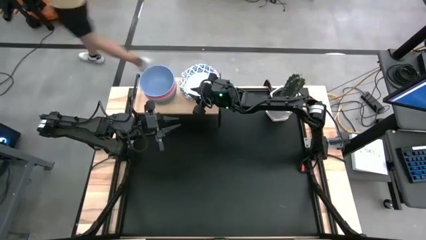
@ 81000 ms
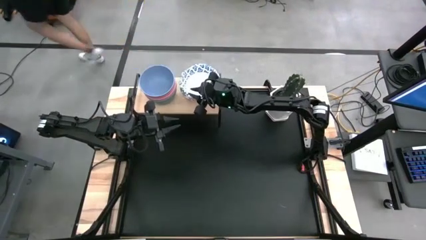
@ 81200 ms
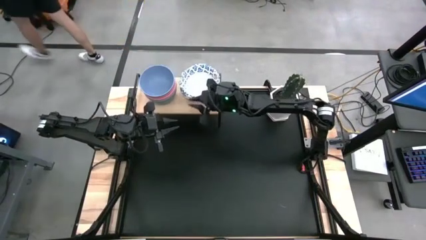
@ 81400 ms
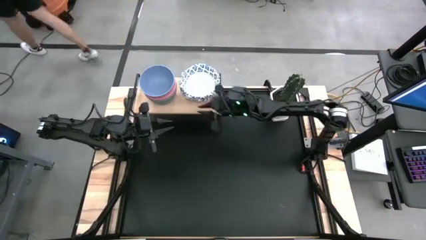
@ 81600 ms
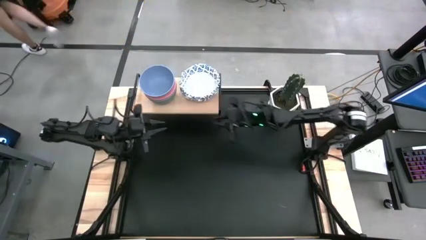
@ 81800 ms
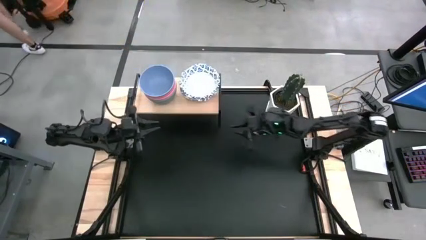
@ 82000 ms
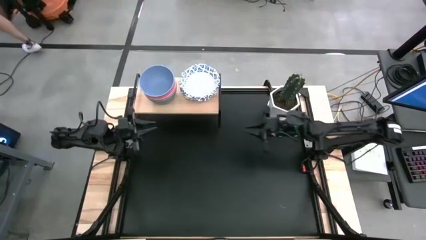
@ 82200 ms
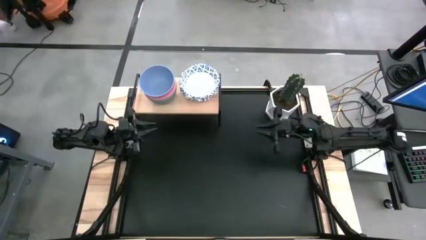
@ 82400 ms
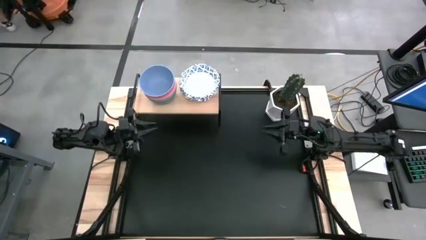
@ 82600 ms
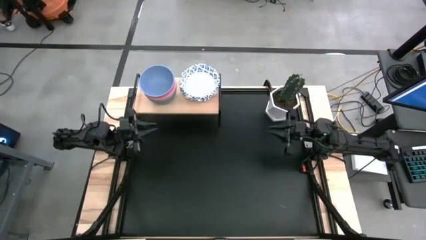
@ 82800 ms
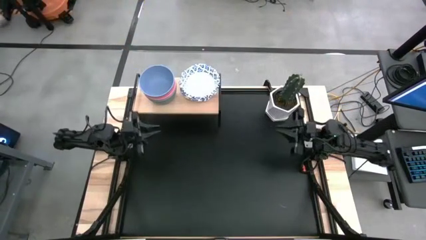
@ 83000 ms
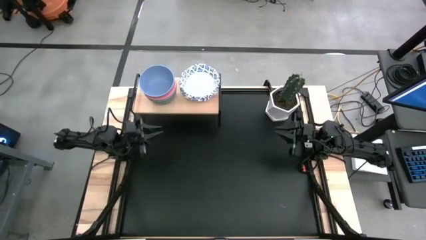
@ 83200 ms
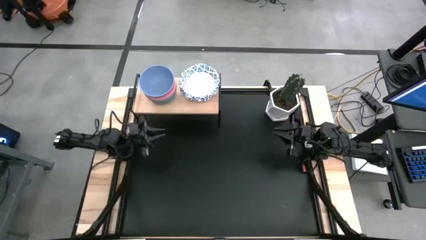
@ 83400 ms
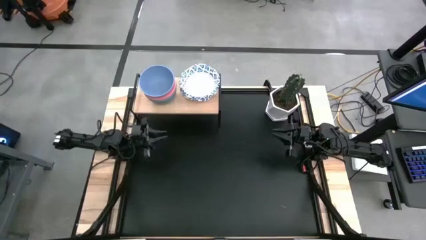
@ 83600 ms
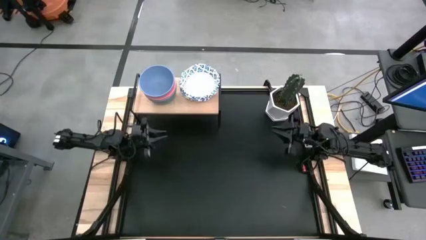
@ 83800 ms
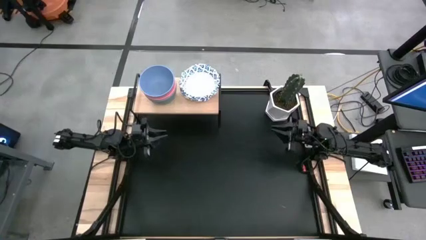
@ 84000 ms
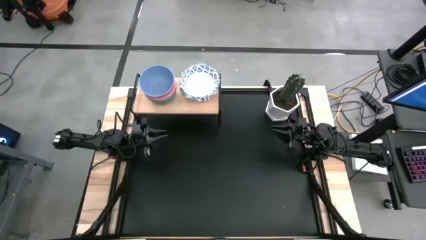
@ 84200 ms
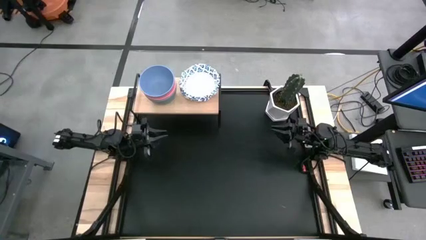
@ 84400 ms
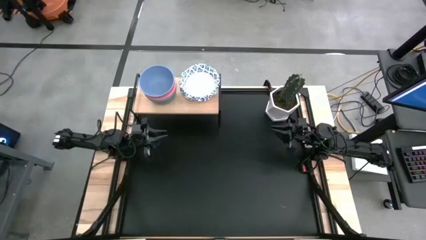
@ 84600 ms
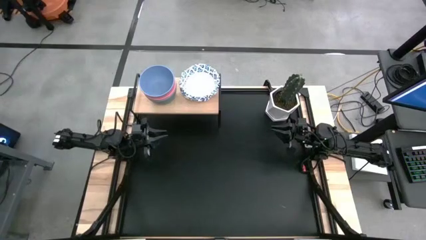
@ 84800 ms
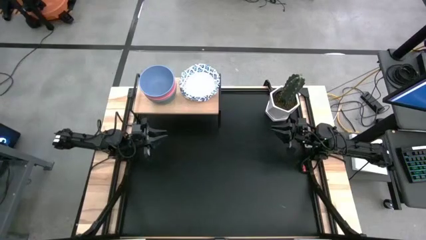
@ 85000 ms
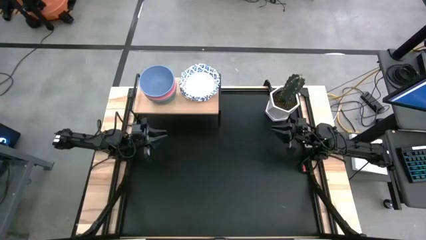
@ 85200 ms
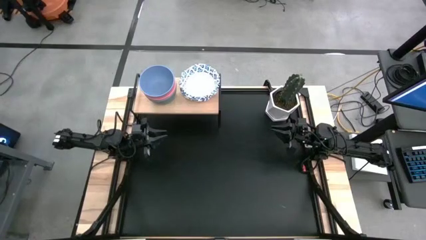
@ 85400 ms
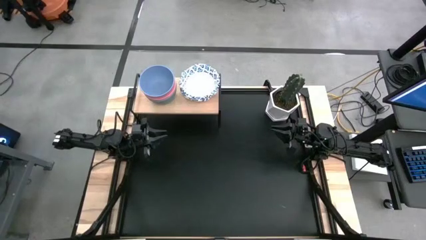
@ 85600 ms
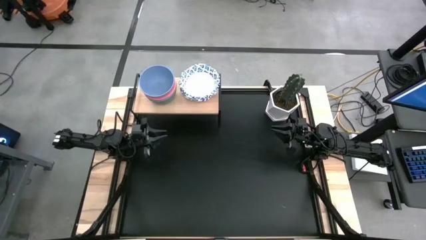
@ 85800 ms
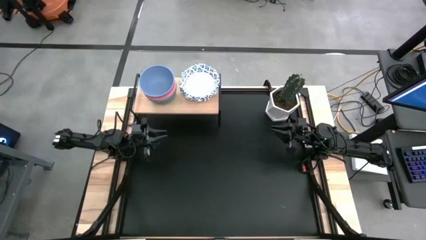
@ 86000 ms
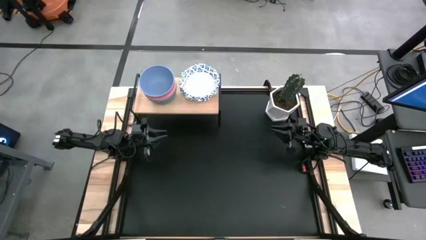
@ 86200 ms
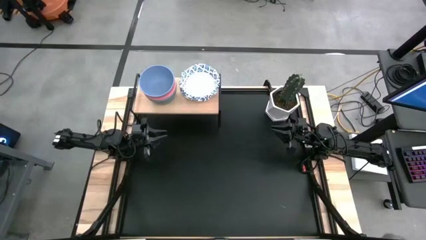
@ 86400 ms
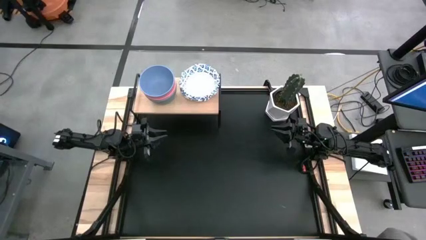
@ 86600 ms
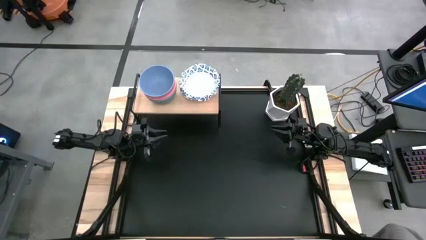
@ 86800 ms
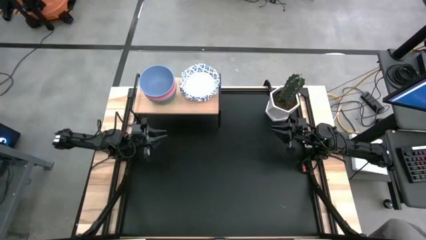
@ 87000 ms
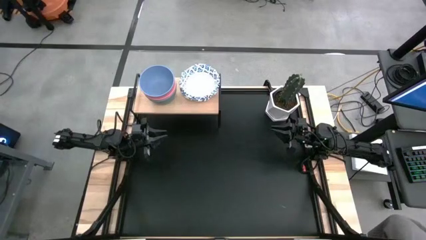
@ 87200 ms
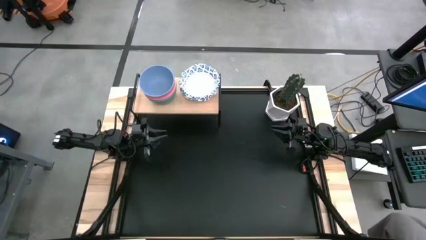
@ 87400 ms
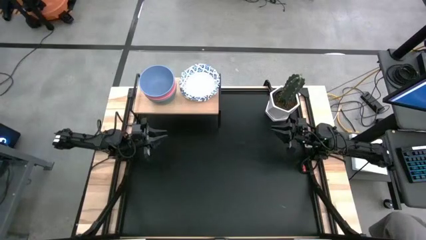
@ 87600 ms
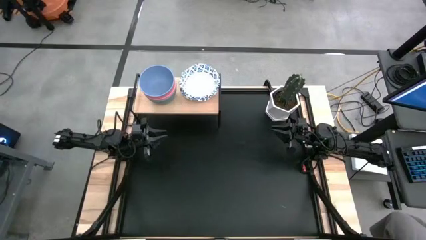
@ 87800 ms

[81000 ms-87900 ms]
Task: Place and stack bowls onto a shelf
Return to Home Position

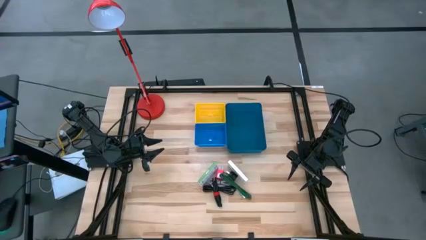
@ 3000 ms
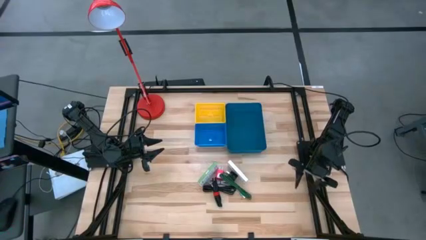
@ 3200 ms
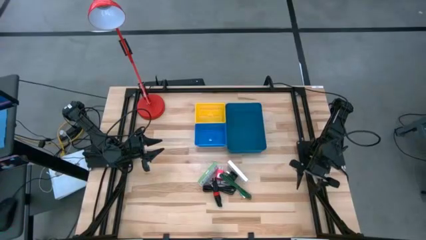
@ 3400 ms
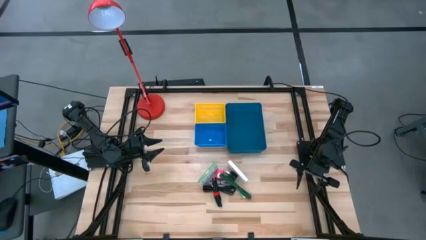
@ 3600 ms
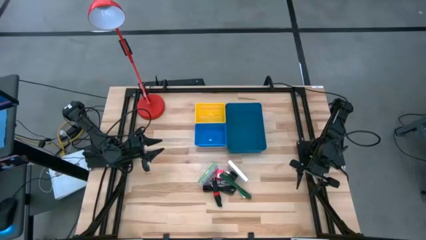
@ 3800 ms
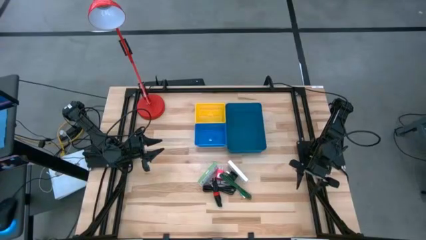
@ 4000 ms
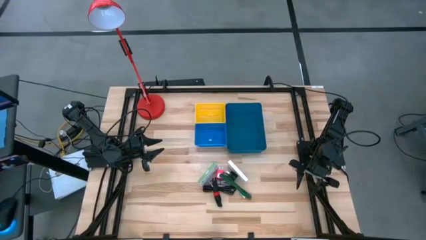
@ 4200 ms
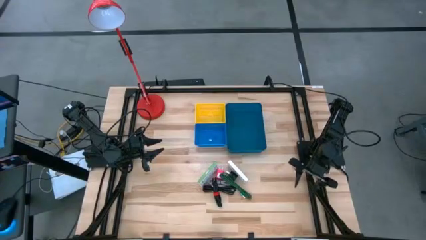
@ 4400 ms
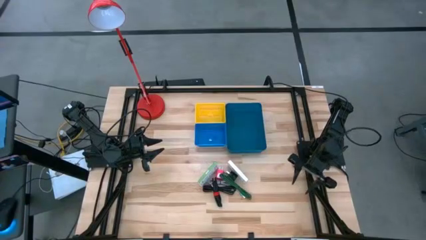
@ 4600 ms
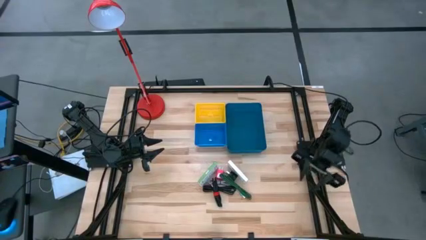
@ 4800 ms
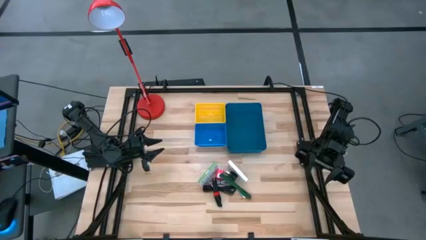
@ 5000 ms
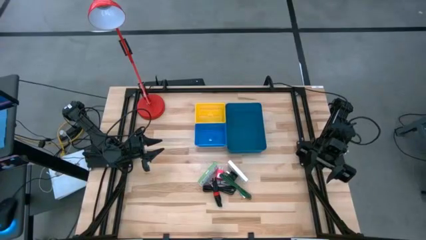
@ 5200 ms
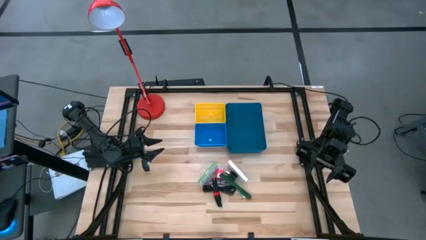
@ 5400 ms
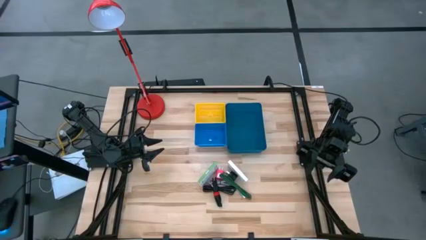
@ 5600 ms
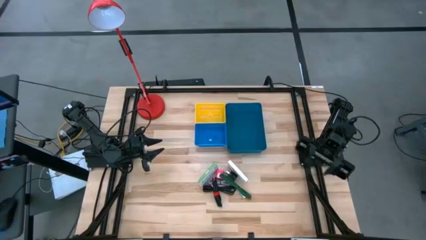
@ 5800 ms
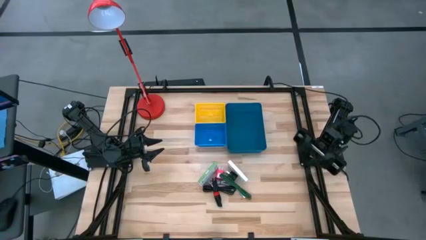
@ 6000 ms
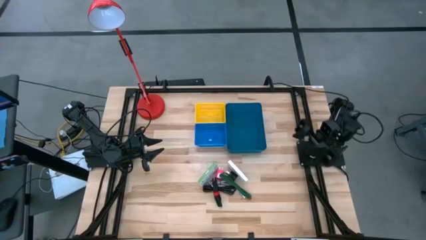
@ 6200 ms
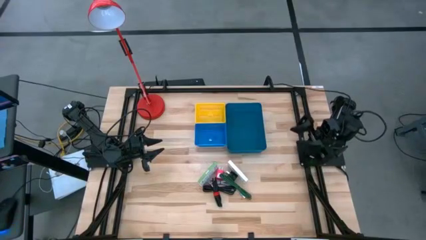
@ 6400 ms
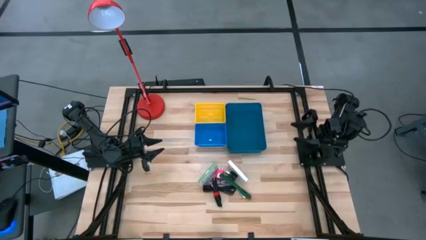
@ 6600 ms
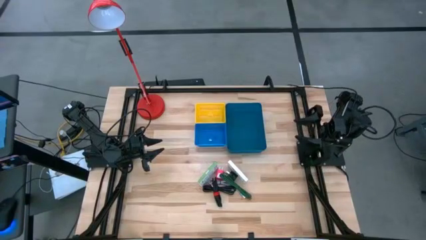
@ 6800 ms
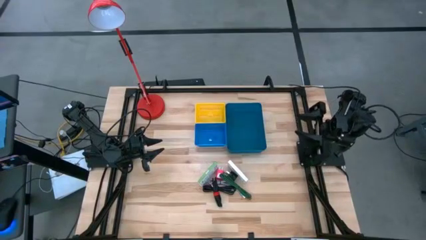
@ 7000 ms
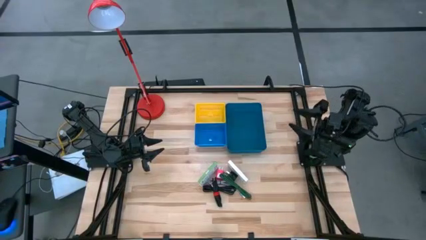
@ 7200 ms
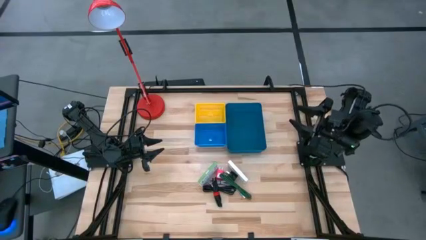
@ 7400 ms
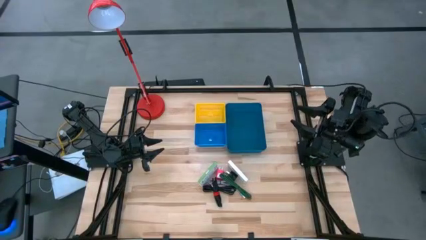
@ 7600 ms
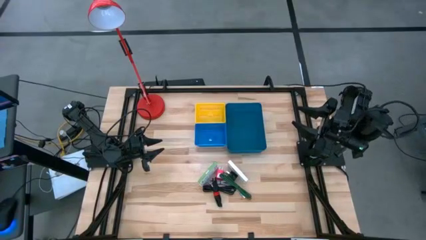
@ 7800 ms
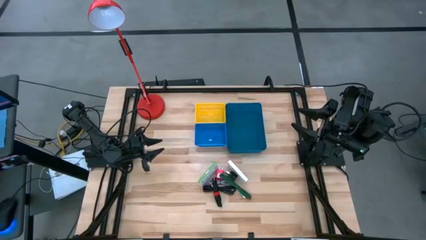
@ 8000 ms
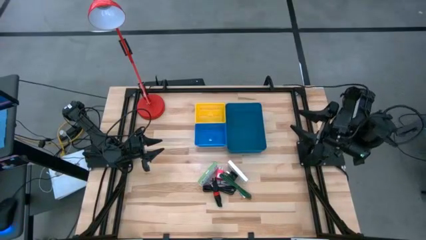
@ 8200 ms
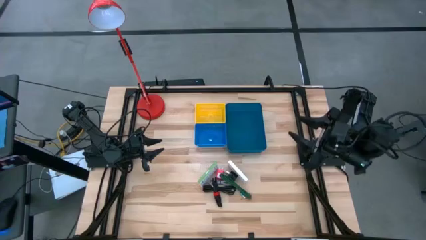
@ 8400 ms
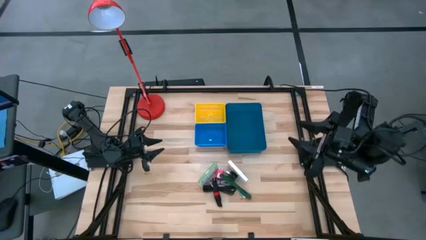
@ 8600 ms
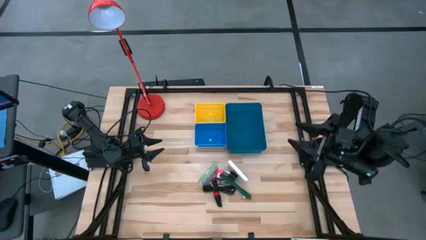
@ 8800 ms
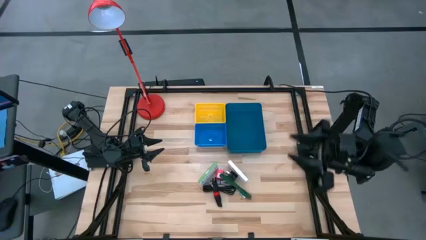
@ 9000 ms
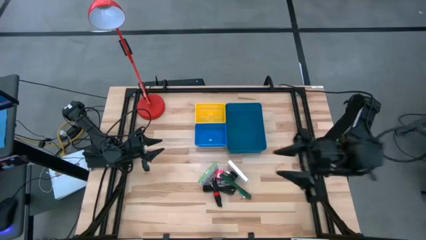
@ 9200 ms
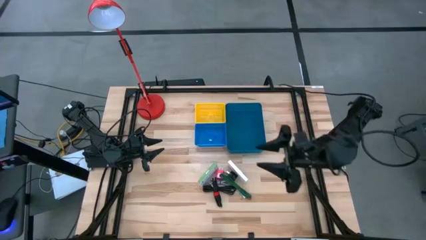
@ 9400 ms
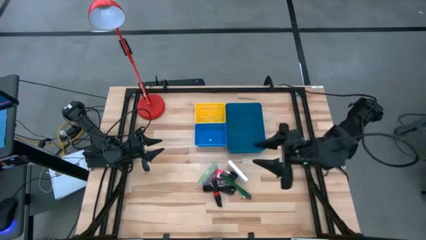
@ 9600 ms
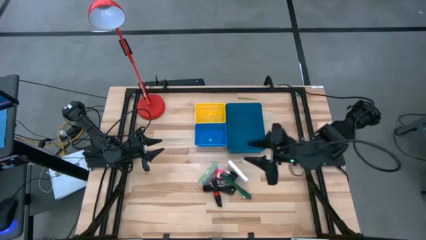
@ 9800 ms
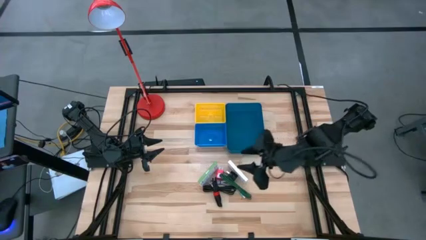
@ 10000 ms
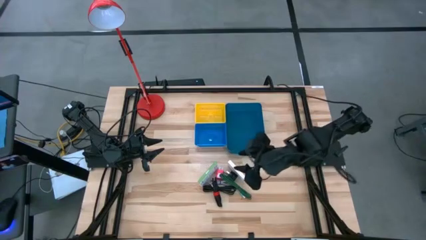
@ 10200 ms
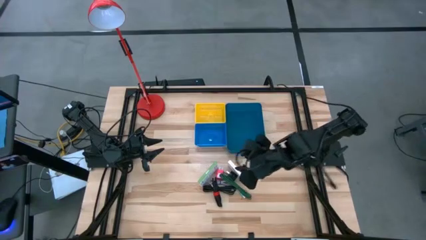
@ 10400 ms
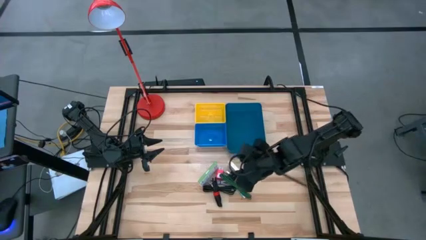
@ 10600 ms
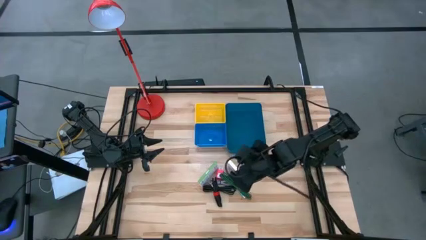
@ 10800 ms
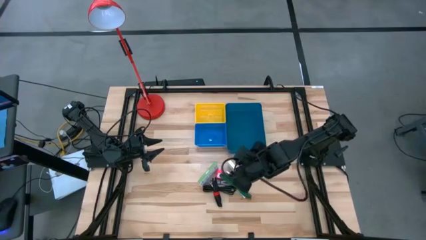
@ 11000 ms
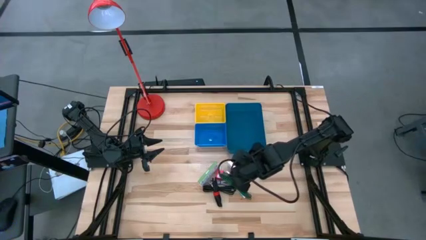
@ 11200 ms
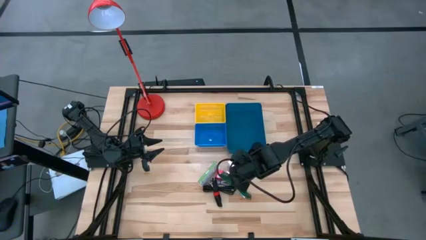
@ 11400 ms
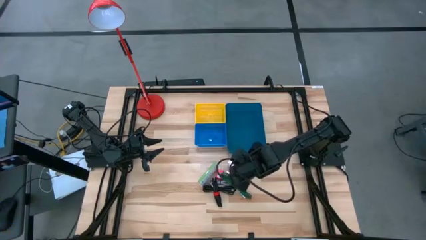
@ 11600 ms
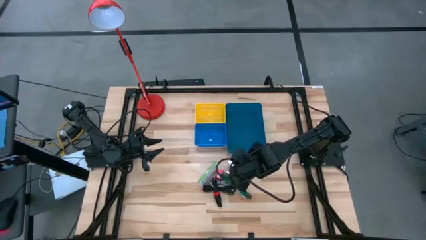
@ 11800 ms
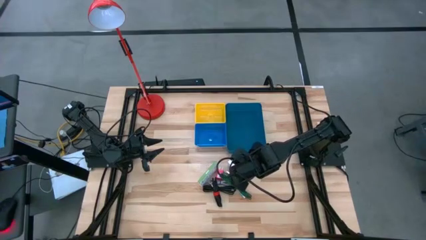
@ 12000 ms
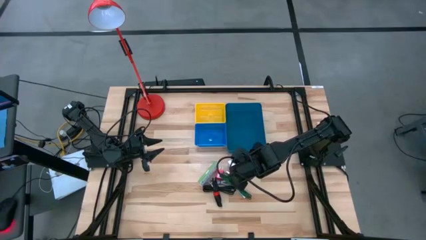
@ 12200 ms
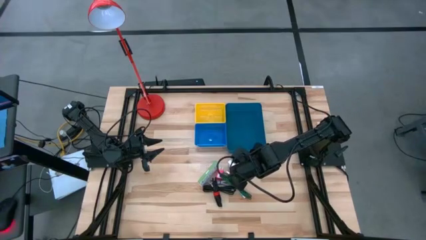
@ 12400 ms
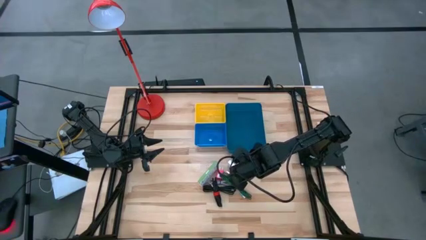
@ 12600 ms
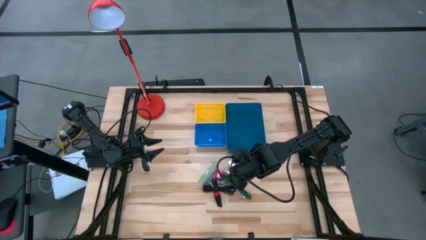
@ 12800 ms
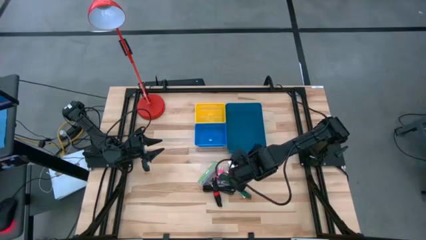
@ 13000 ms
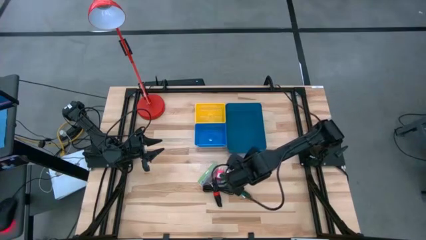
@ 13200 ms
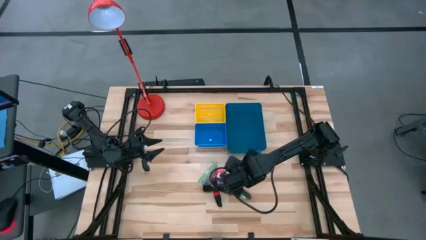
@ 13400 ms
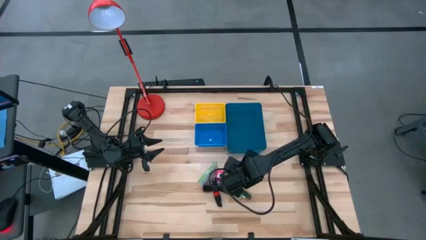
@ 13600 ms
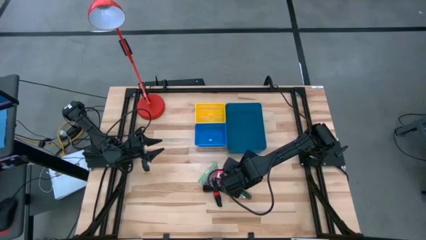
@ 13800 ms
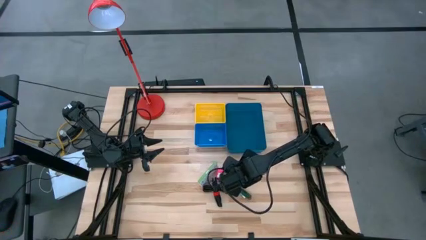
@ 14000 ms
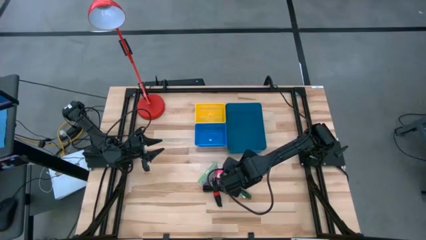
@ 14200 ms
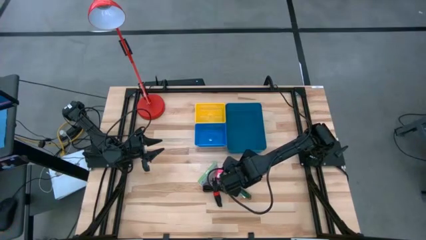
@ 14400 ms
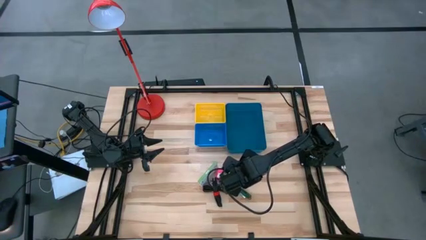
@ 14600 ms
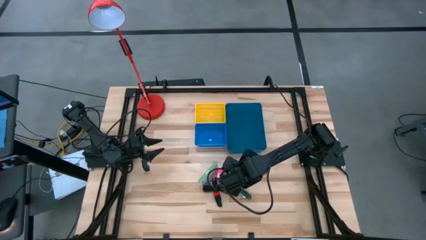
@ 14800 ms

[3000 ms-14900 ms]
Task: Pick and place items into bin
Put the right card reader box into the yellow bin
